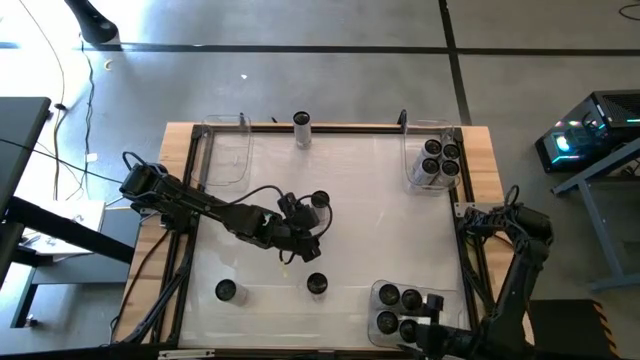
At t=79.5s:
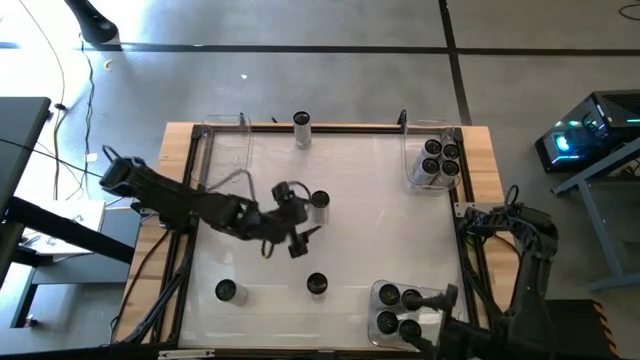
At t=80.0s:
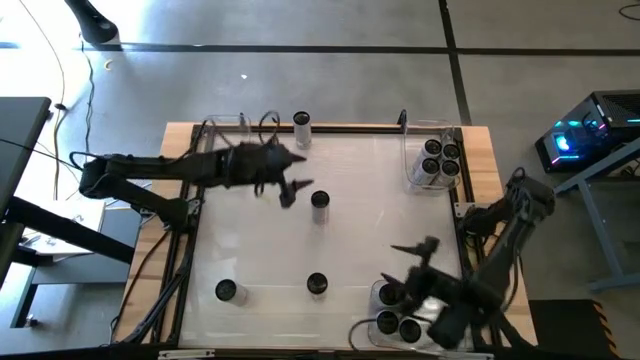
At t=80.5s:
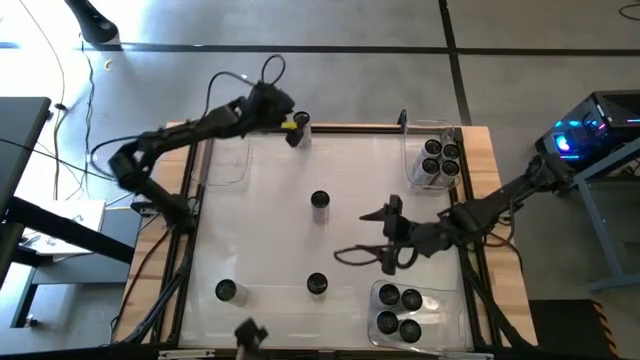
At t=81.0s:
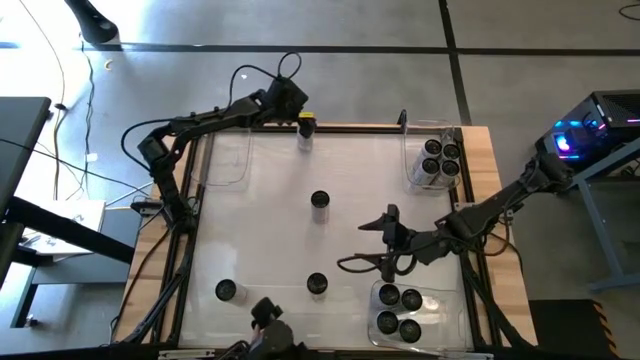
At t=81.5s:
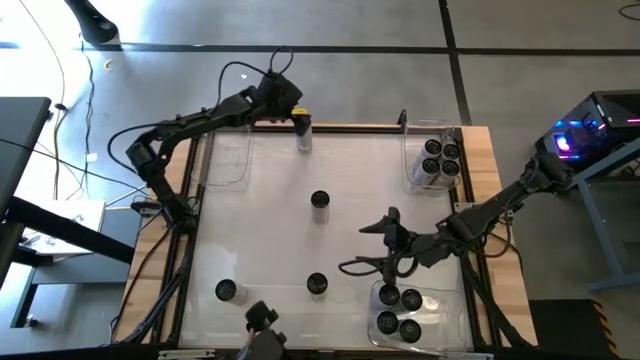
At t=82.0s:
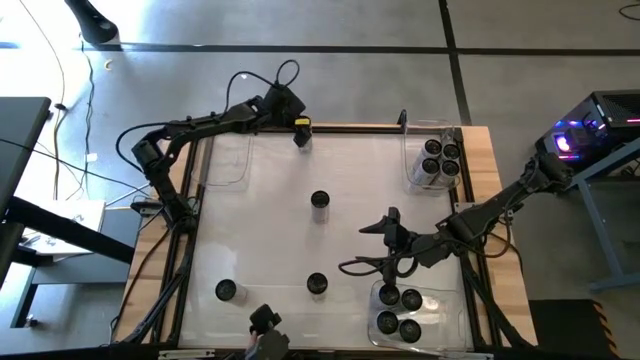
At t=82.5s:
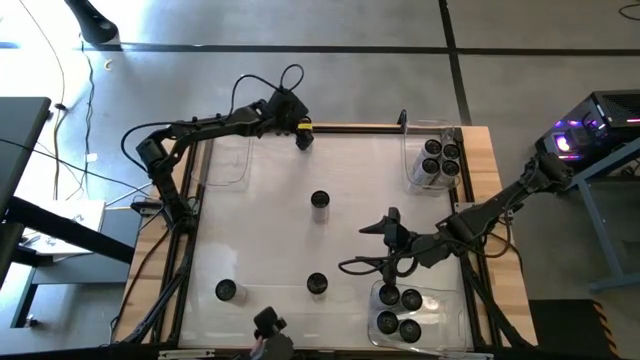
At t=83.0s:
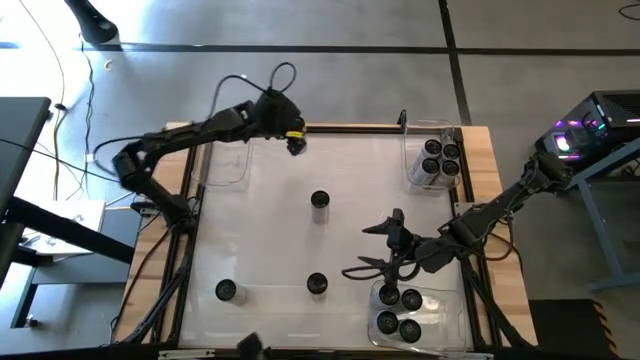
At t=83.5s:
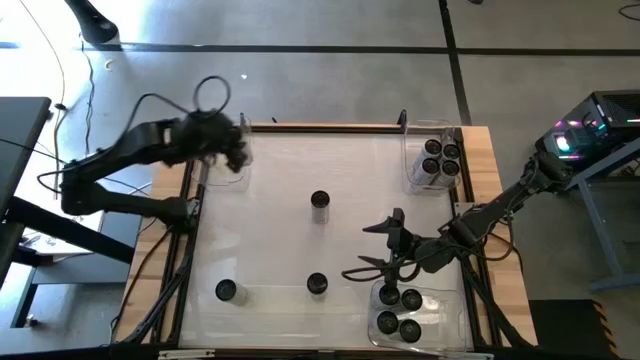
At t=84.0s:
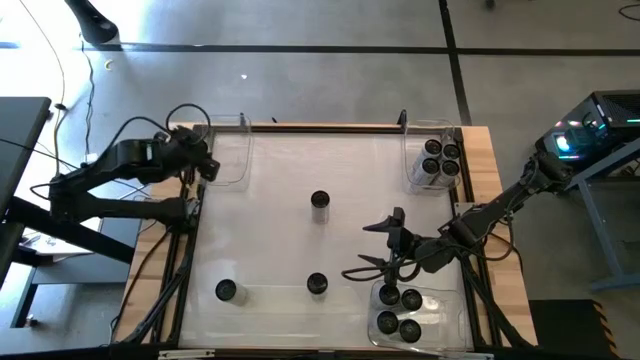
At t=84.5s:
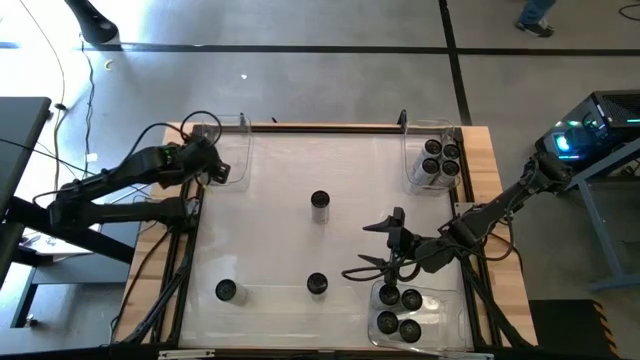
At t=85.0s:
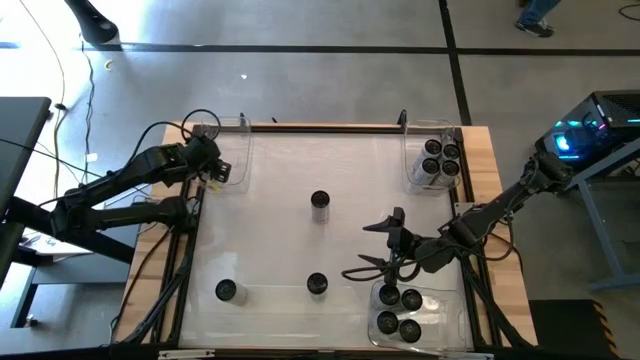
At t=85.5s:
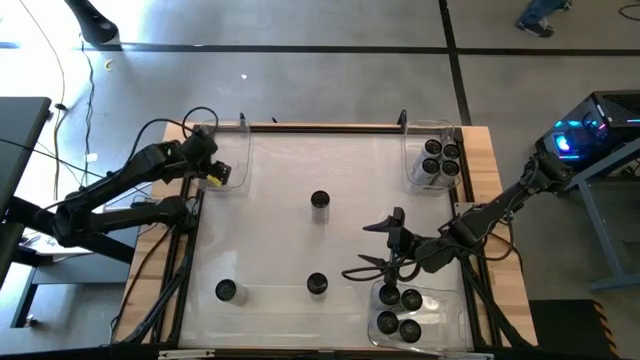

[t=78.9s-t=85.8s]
Task: Sort soda cans
Put the top right pink soda can into the top left transparent bin

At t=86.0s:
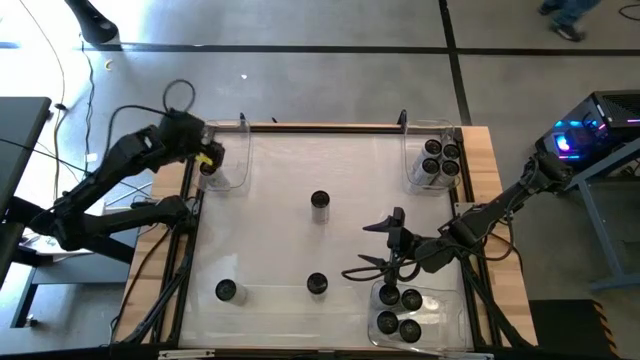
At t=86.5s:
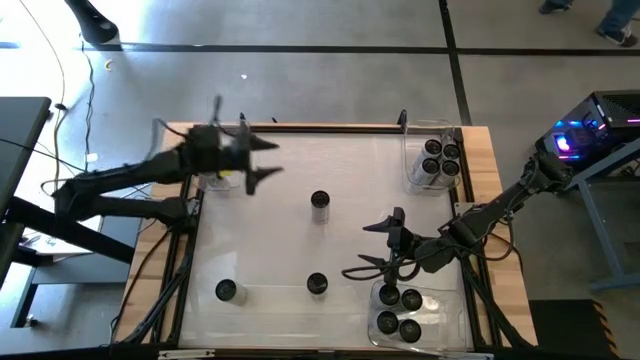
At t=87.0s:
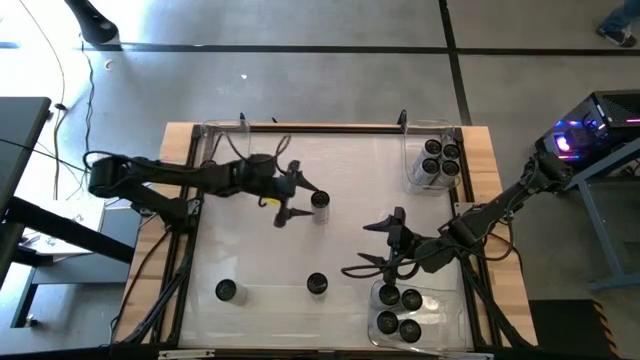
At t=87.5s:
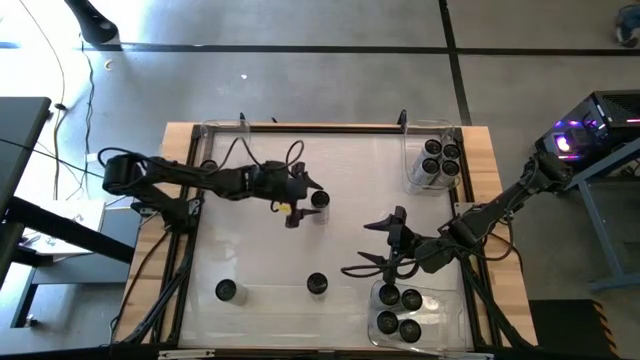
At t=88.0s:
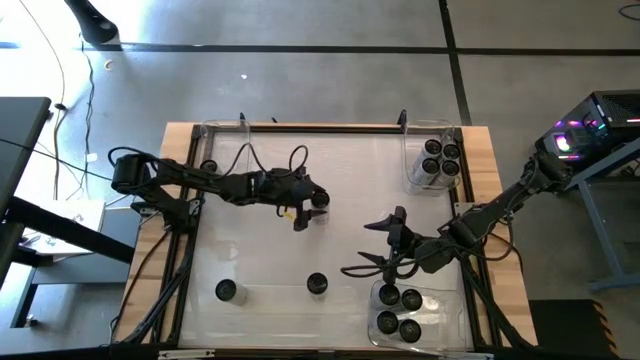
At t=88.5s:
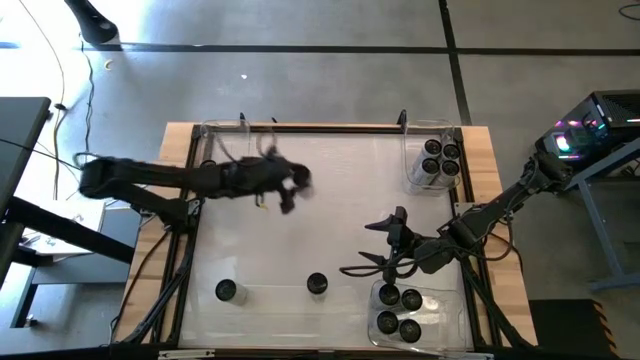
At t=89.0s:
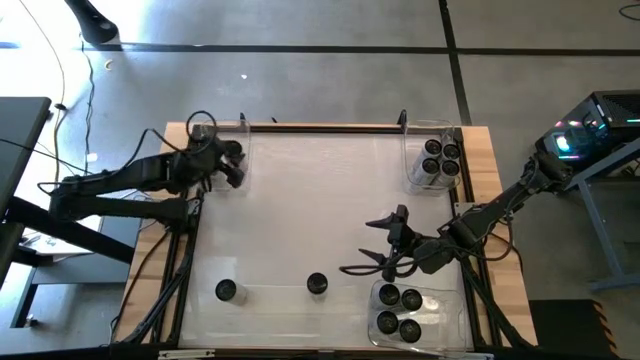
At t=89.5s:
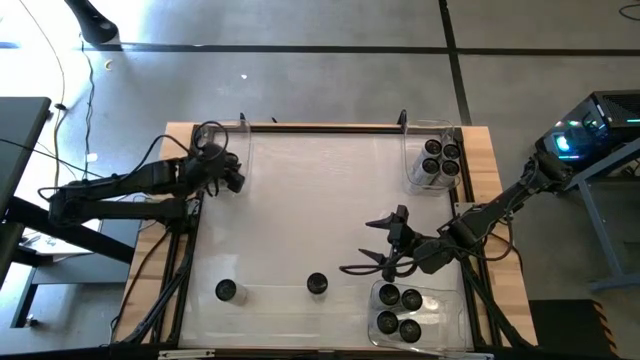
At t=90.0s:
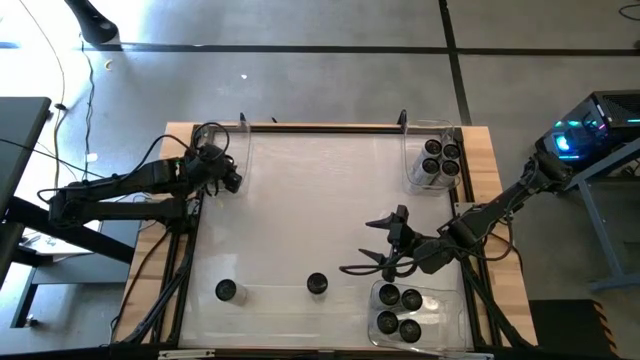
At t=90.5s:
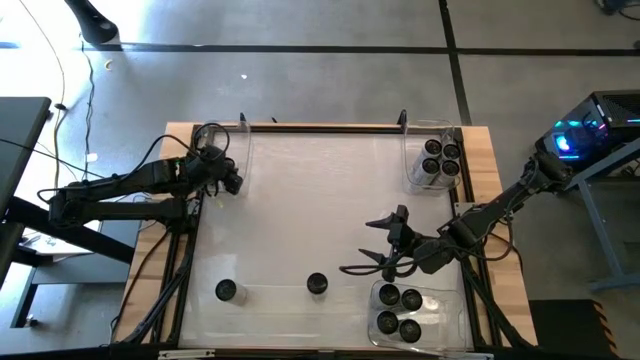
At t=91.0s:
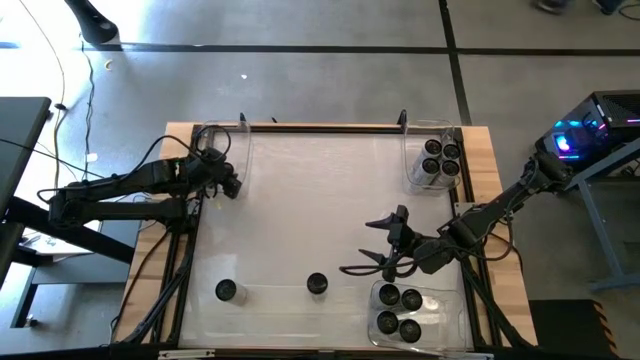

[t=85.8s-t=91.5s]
Put the pink soda can into the top left transparent bin

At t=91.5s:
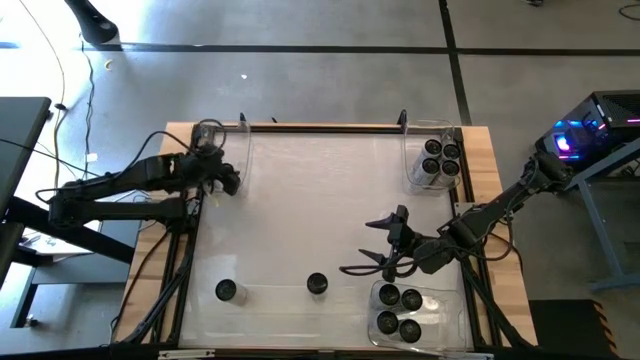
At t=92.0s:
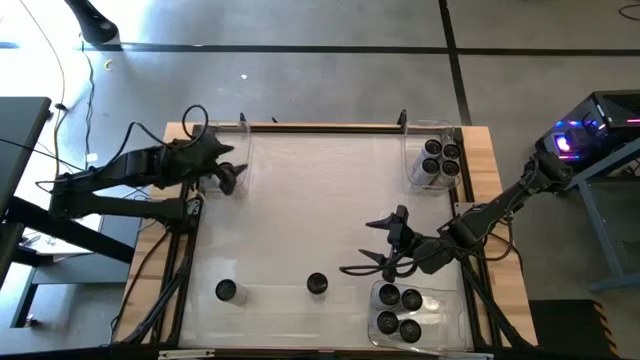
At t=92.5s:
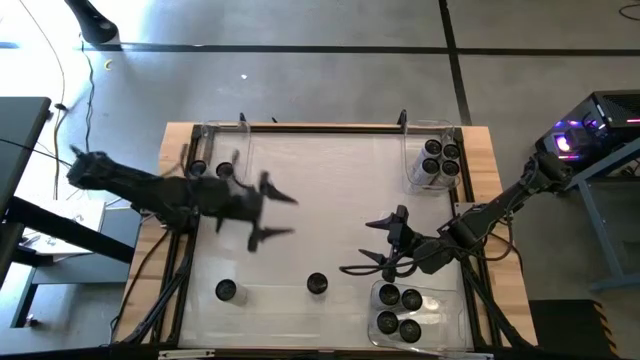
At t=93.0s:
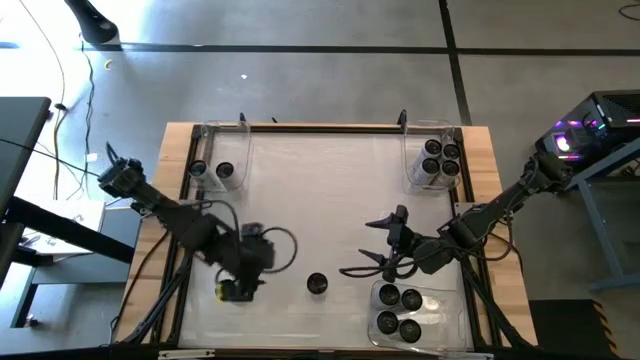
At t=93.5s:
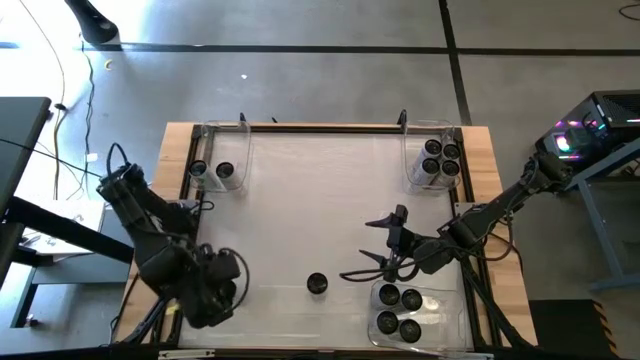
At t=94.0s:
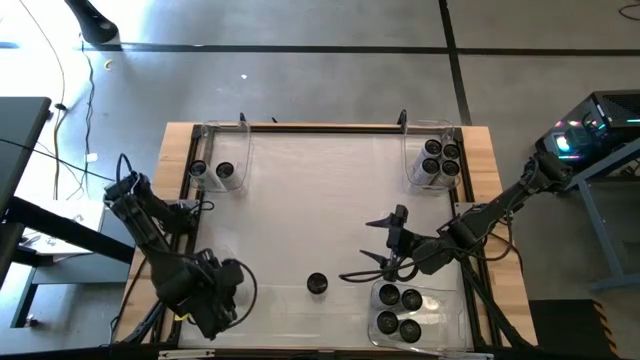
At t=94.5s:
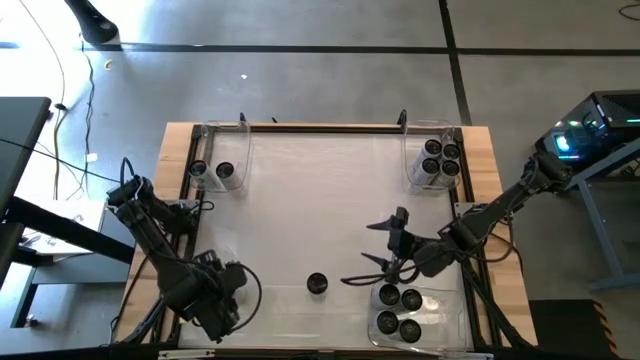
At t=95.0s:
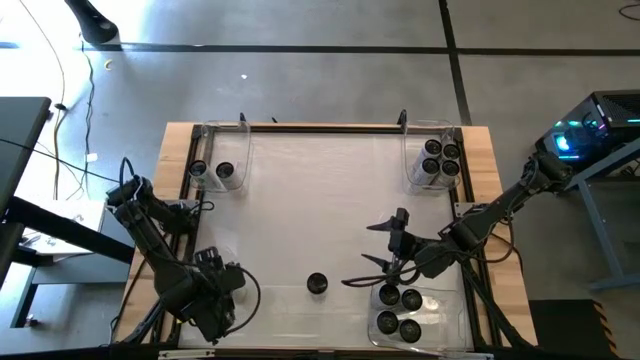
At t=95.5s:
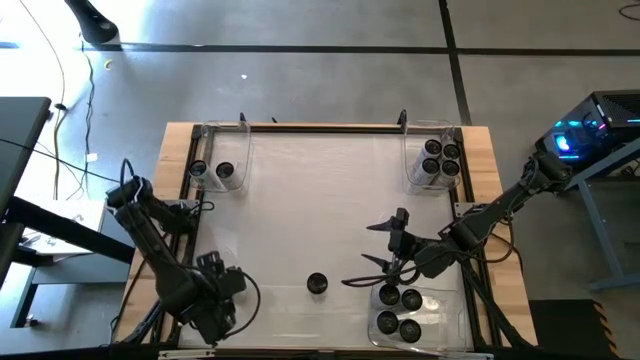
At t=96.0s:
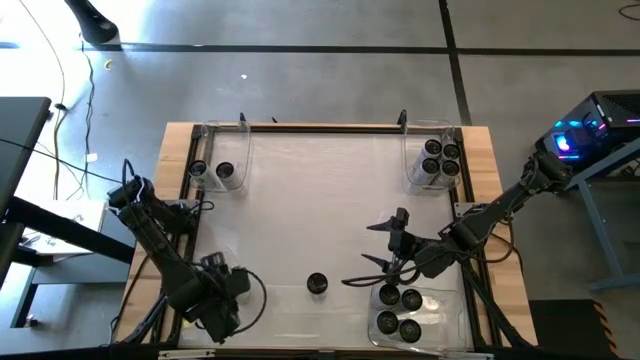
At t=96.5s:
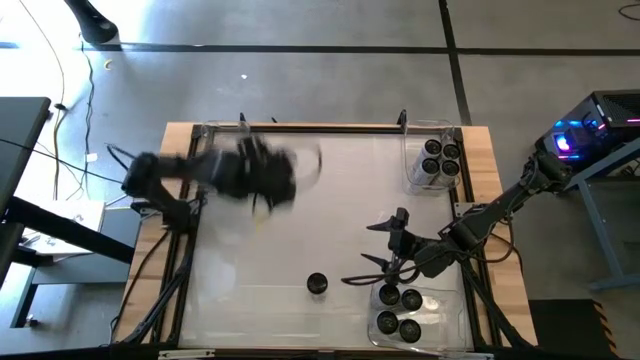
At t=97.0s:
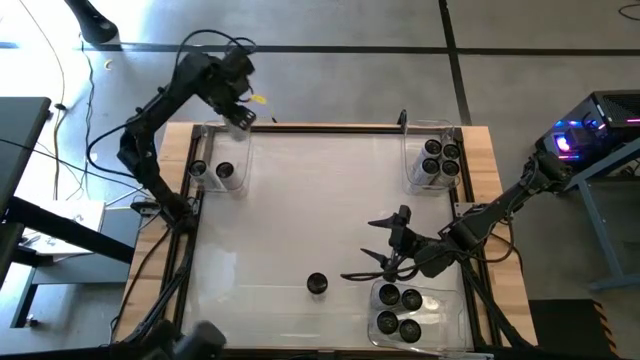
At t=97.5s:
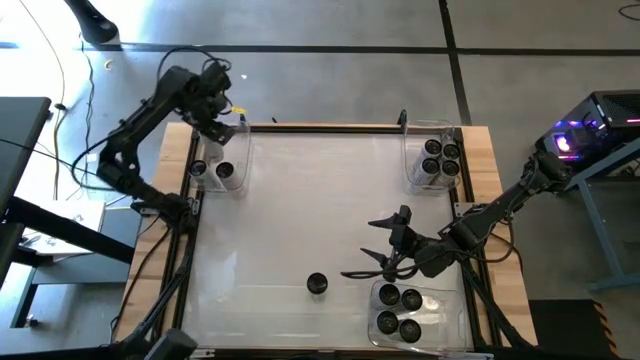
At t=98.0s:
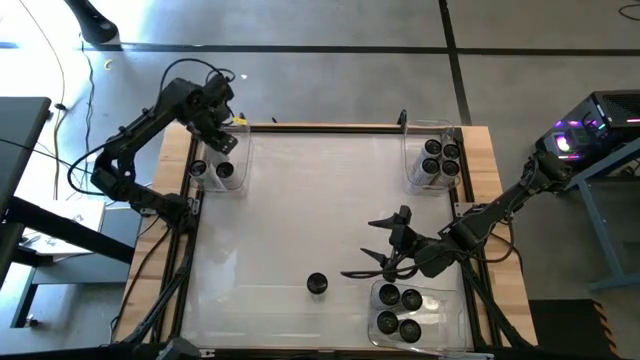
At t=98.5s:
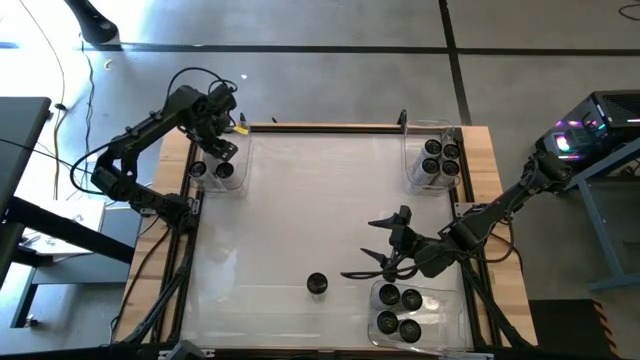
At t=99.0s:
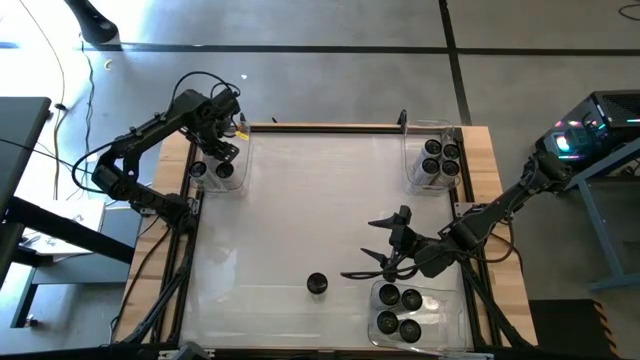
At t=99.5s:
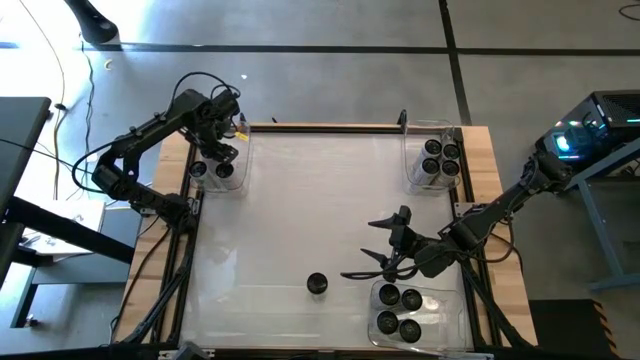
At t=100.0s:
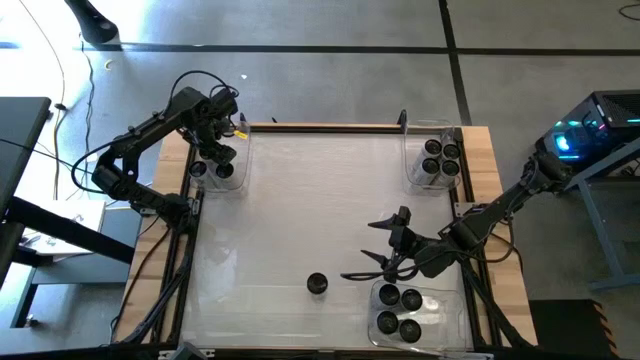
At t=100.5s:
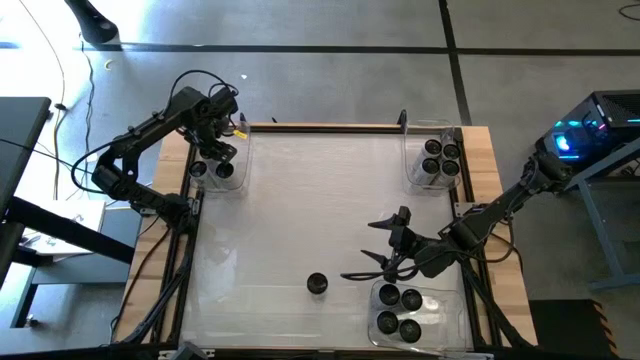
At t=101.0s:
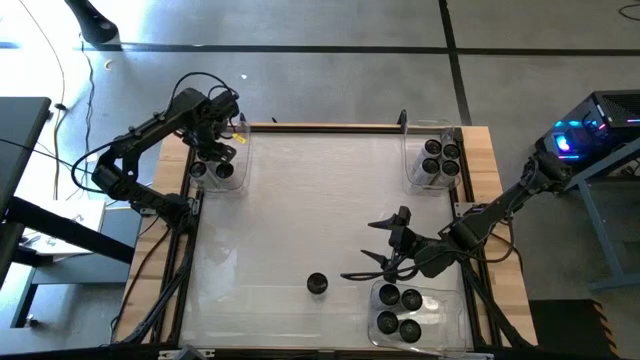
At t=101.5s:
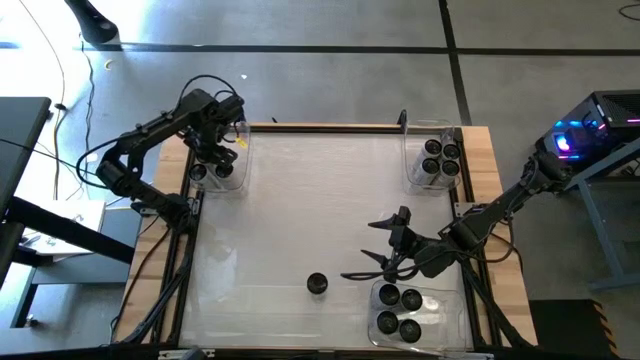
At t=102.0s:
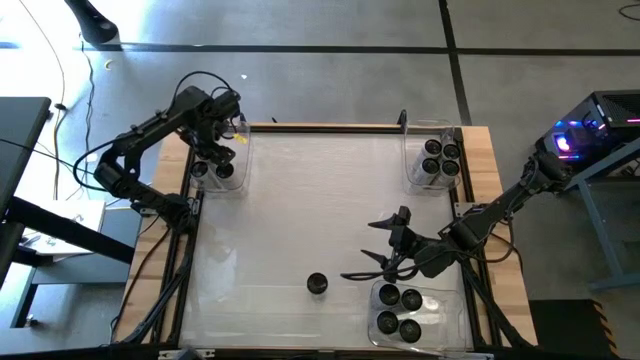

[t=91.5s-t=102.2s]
Put the pink soda can into the top left transparent bin
